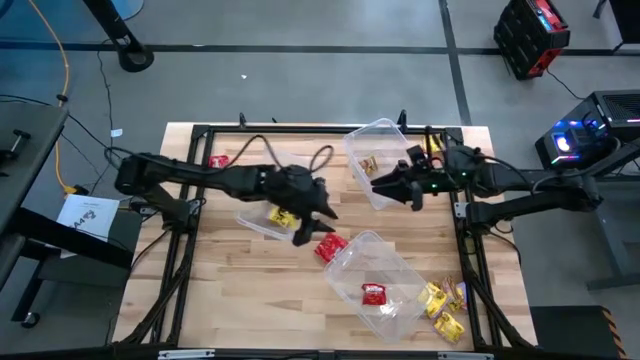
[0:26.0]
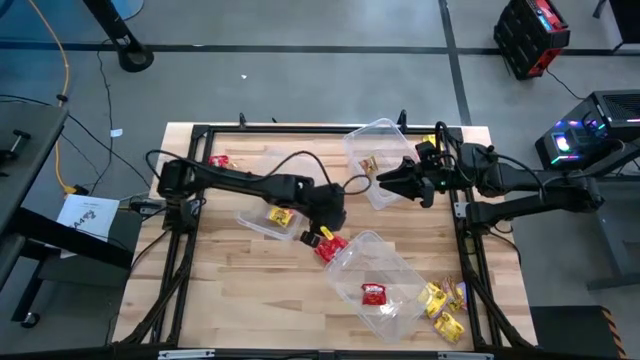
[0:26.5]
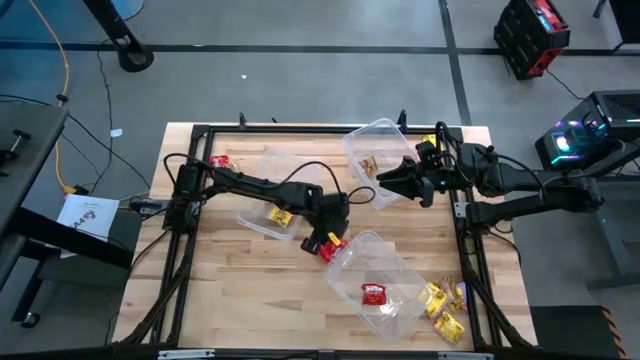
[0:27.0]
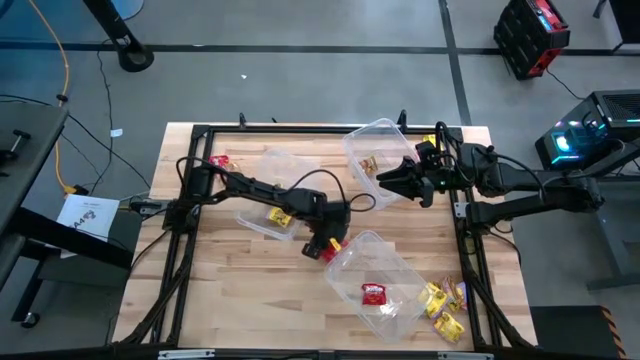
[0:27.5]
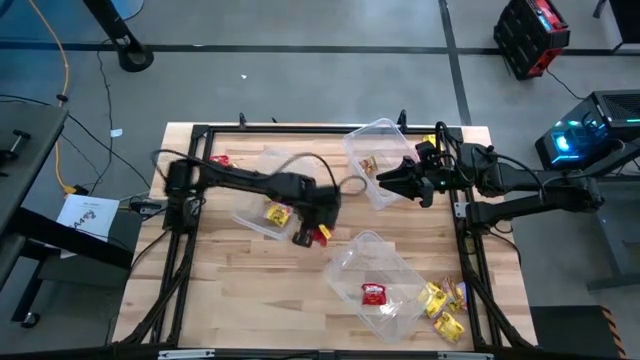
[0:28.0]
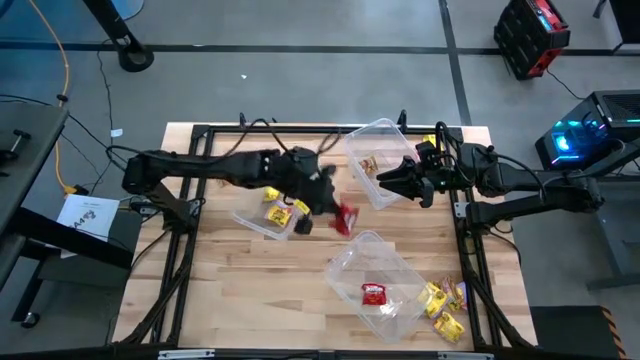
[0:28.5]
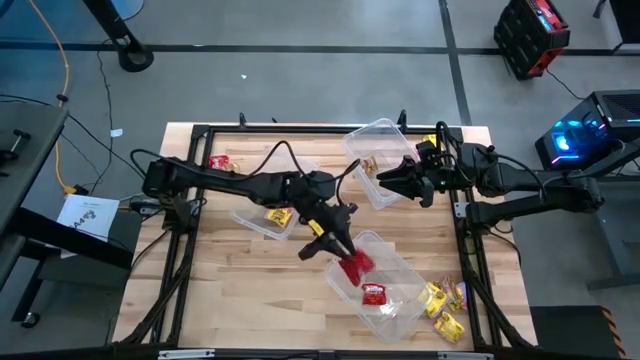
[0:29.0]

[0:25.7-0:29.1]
Task: Sort candy
Put the red candy into the bottom right transparent bin

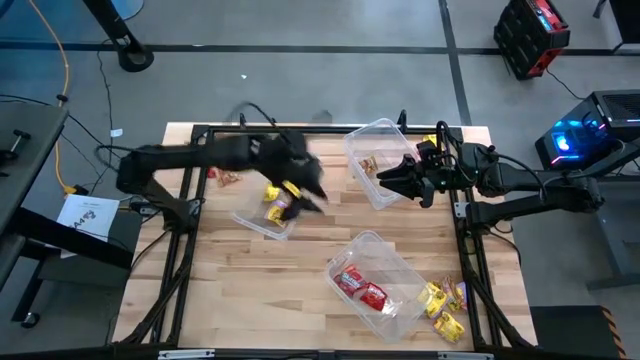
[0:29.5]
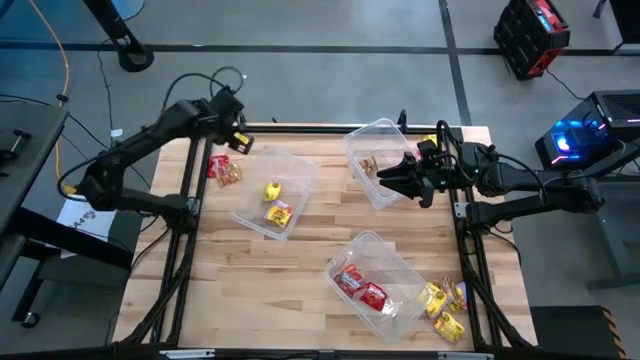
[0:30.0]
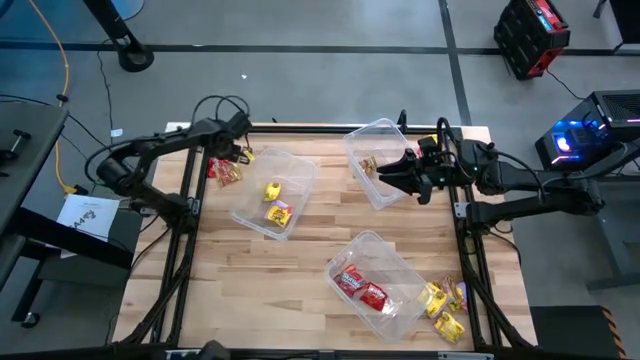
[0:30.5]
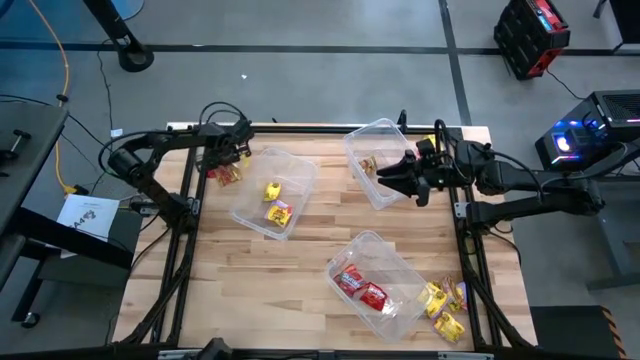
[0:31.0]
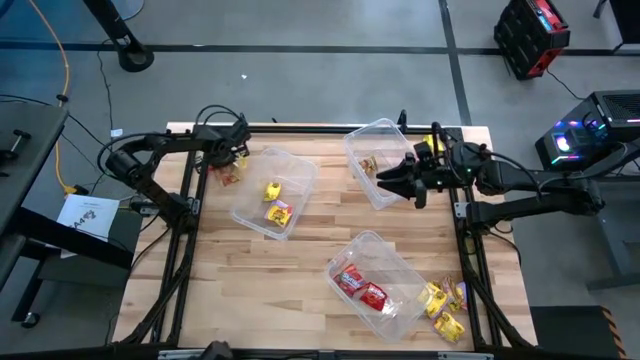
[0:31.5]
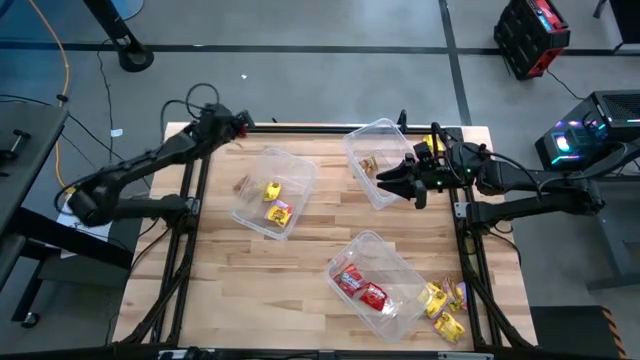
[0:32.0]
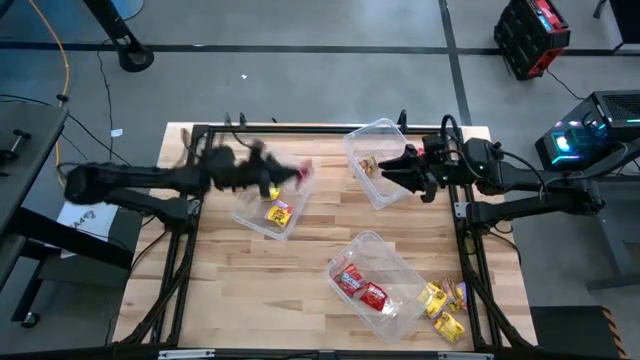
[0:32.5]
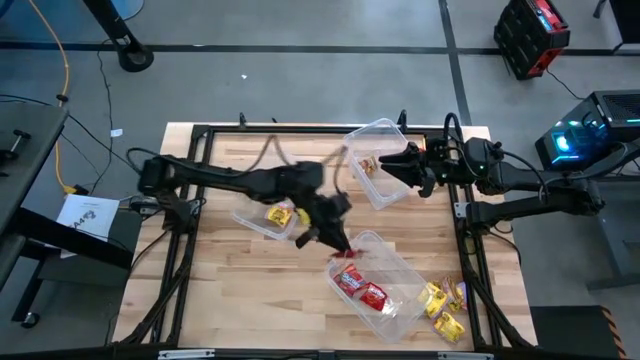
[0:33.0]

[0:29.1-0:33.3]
Put the red candy into the bottom right transparent bin

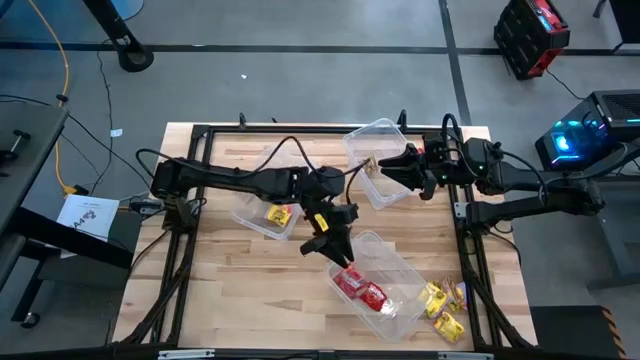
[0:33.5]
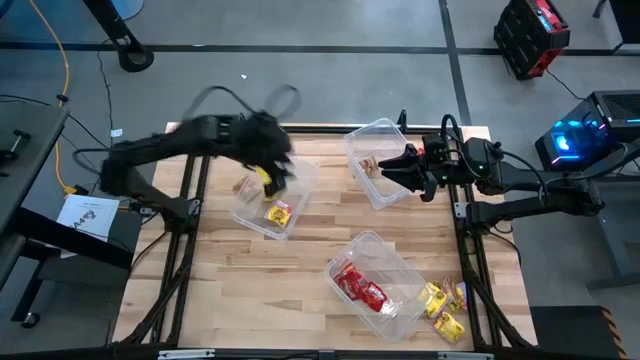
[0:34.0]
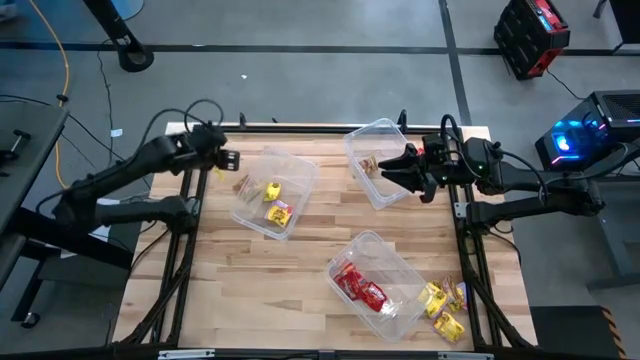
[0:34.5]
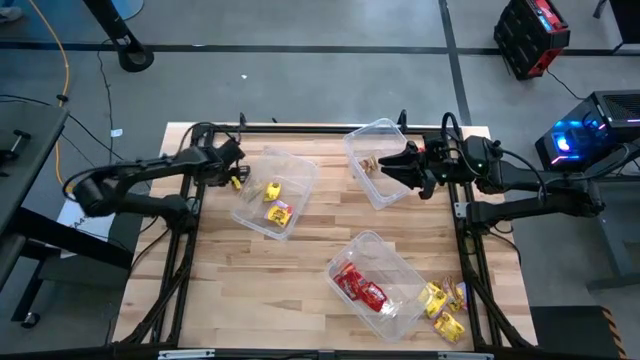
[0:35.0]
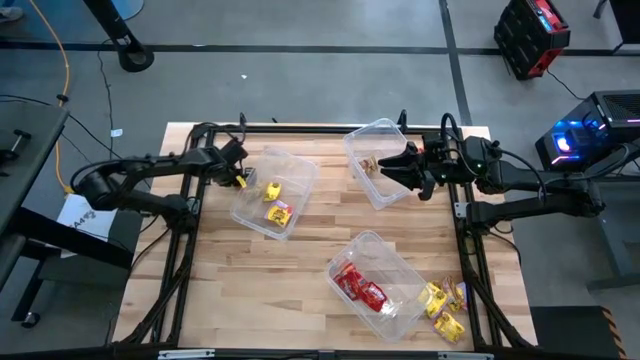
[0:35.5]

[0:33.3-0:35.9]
Put the brown candy into the top right transparent bin

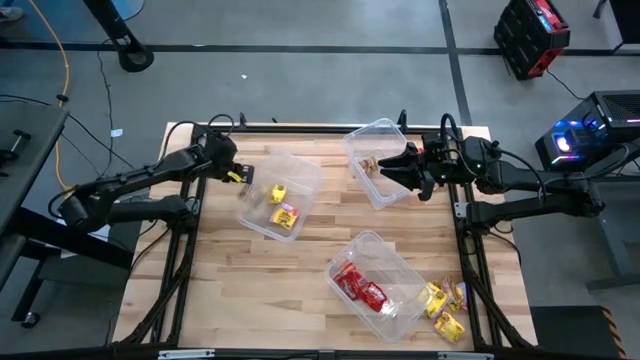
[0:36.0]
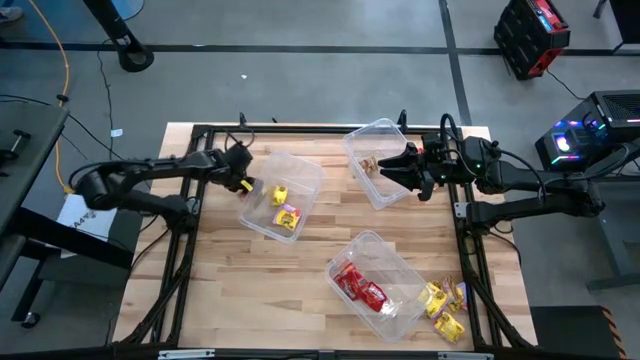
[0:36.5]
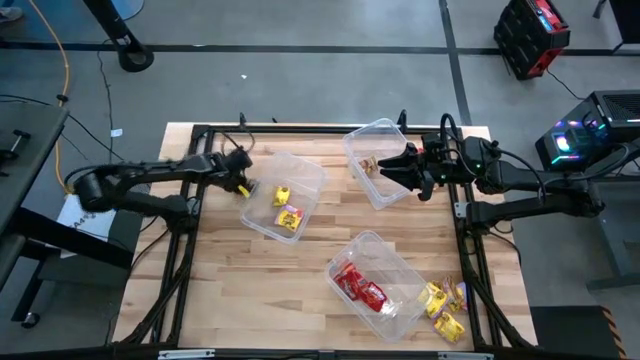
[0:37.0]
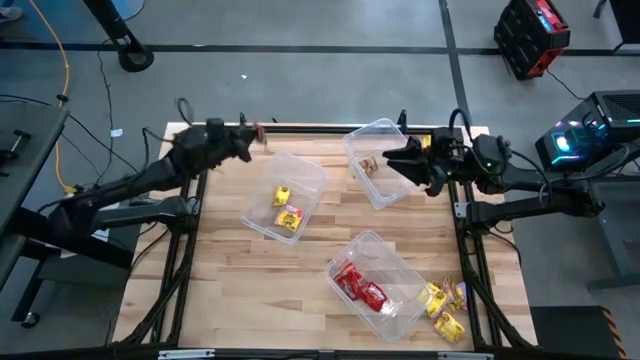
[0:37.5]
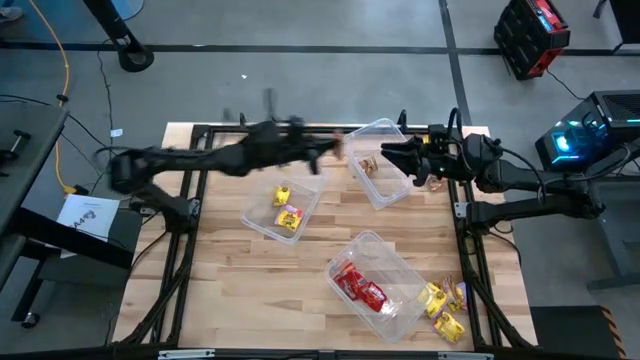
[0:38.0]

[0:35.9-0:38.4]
Put the brown candy into the top right transparent bin

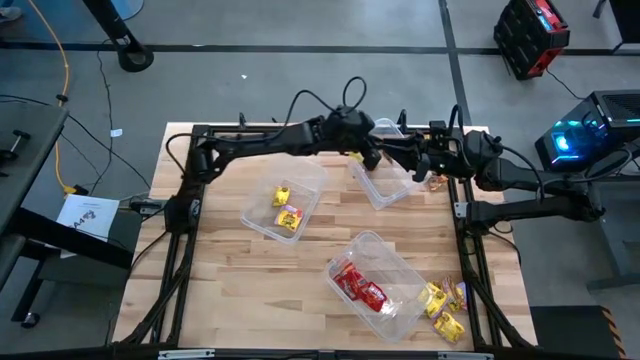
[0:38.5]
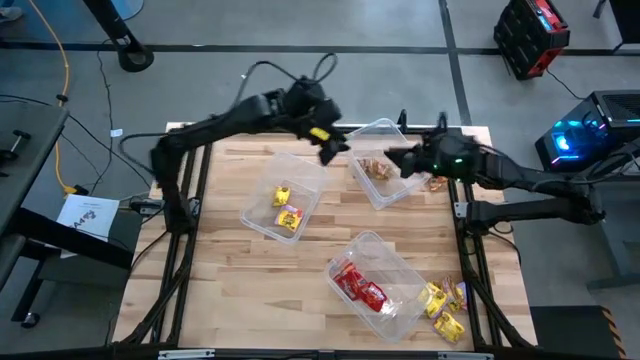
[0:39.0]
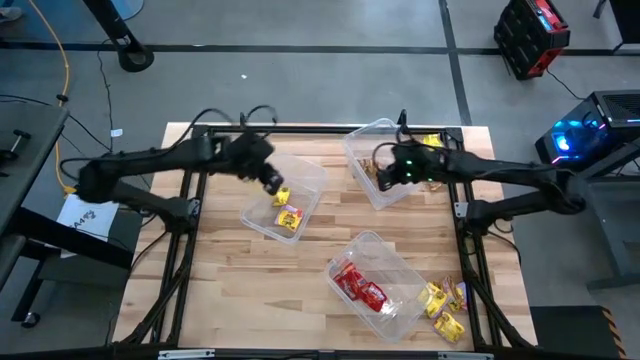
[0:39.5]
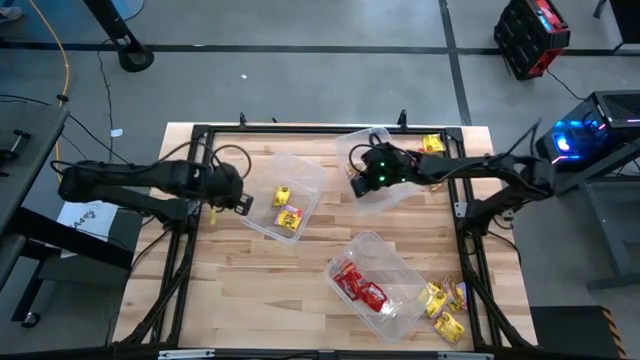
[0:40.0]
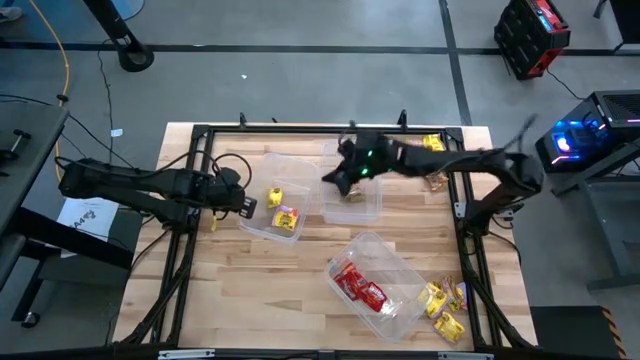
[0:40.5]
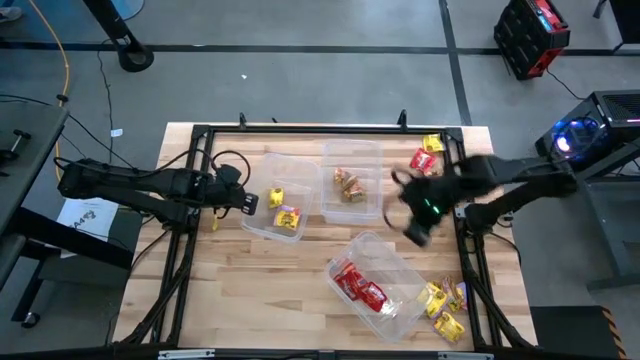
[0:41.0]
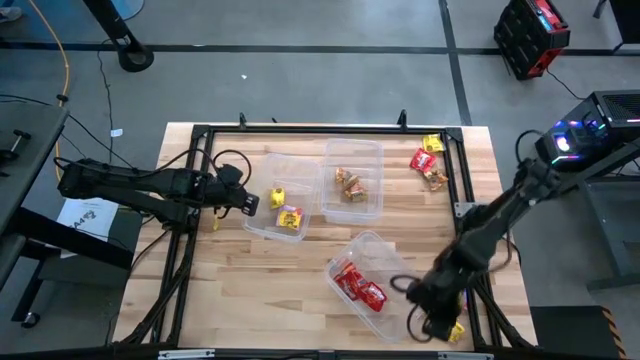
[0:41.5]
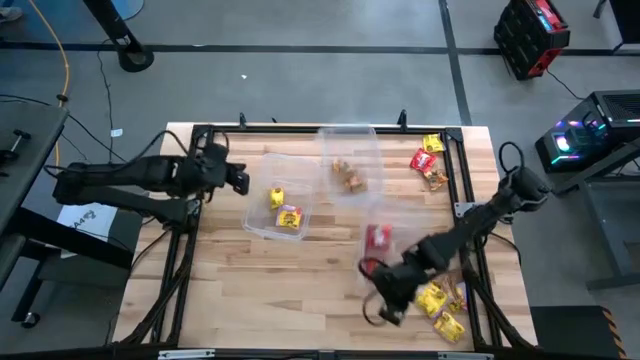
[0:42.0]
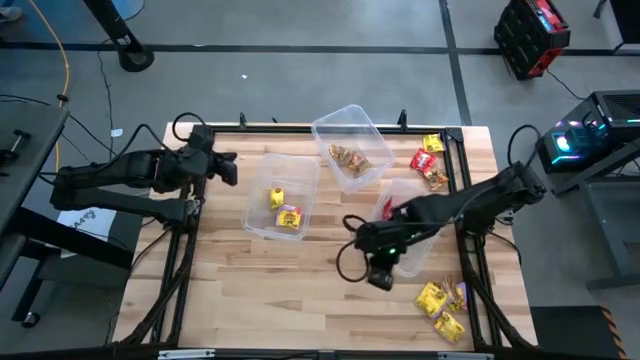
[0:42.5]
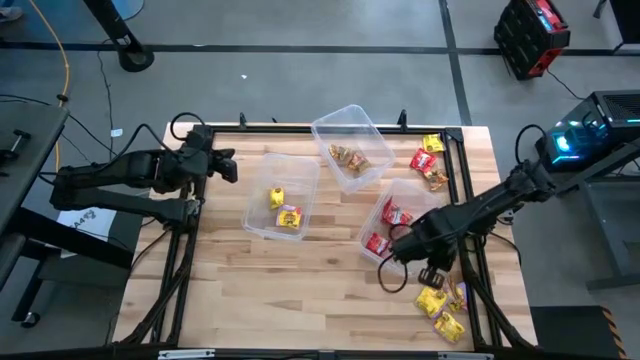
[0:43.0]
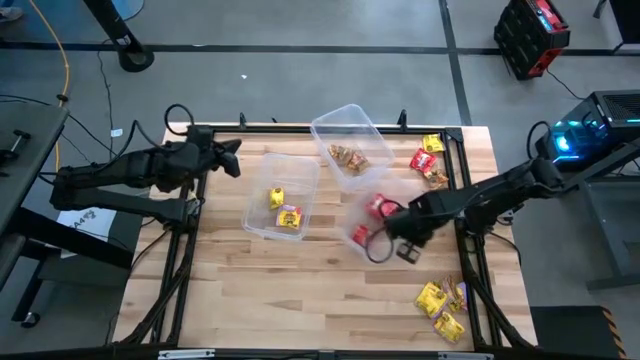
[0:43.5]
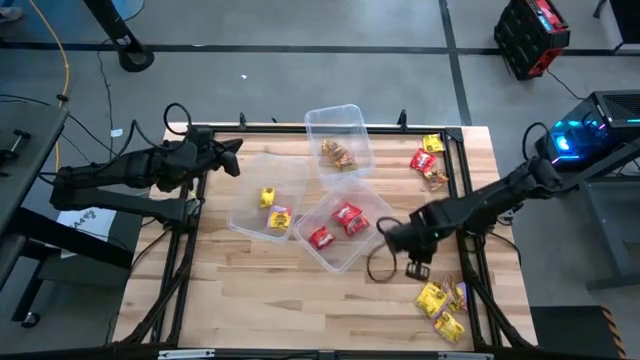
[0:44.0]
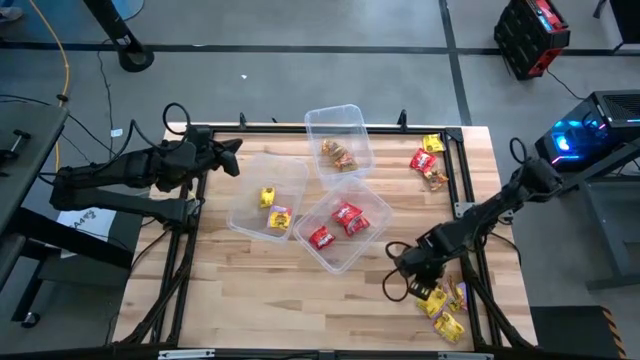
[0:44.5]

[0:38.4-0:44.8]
Adjust the transparent bins

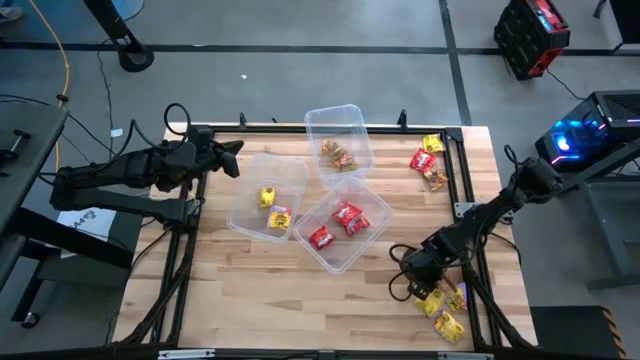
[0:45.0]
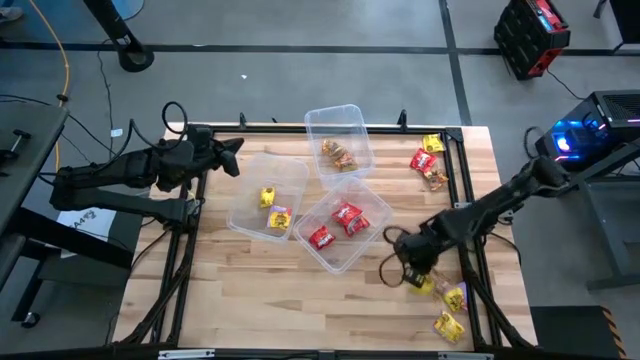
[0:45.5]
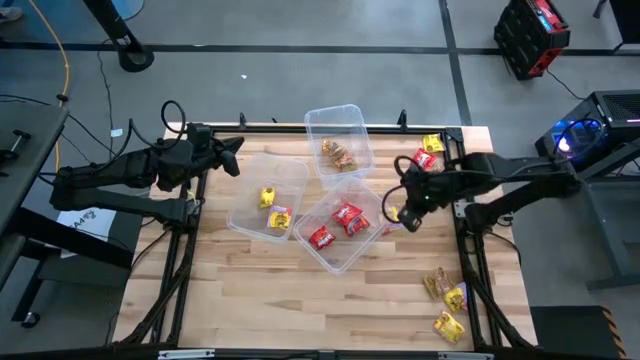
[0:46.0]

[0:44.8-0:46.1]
Put the yellow candy into the bottom left transparent bin

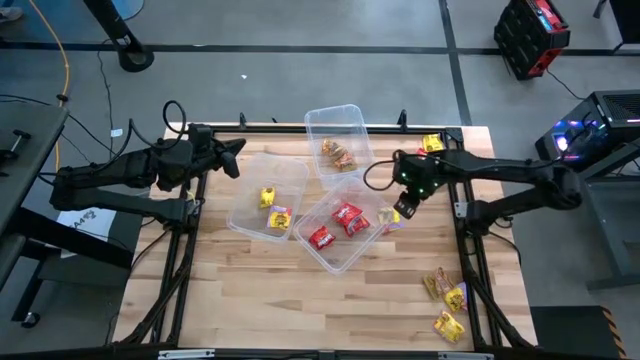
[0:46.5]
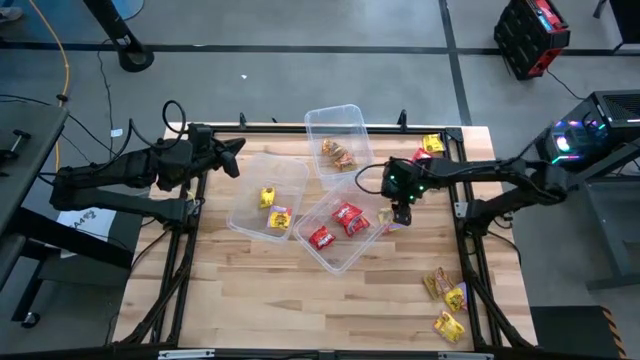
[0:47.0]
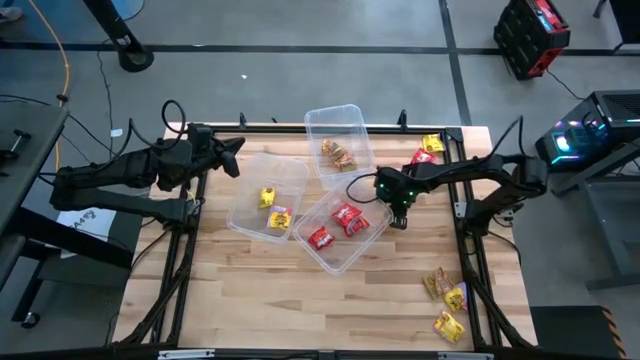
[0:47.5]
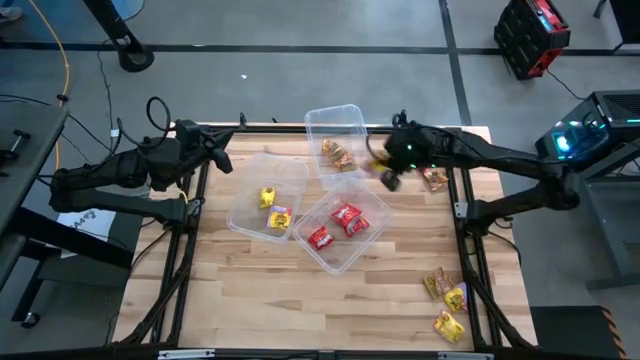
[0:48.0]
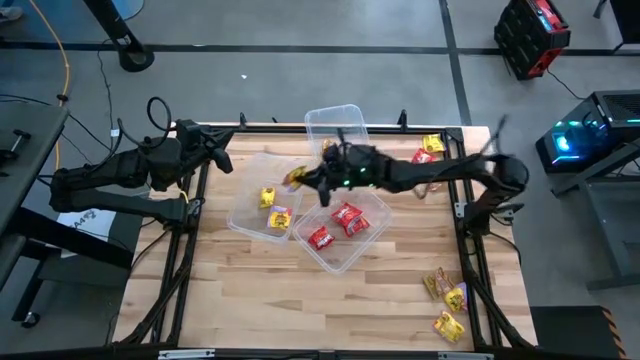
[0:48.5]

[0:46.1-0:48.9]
Put the yellow candy into the bottom left transparent bin
